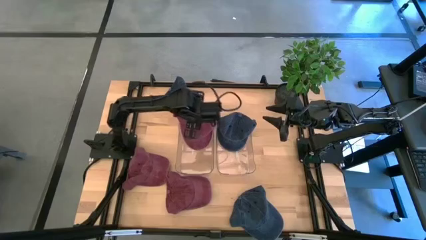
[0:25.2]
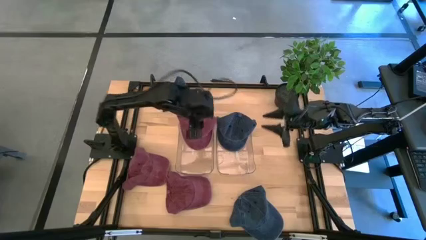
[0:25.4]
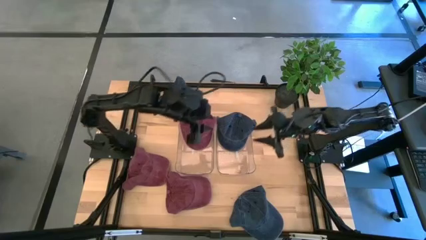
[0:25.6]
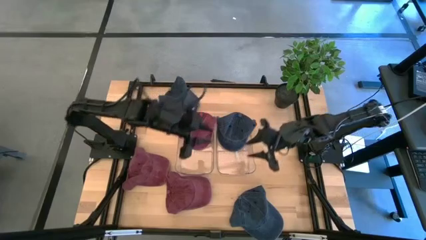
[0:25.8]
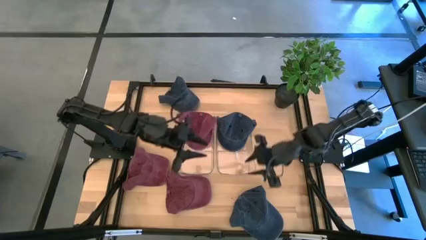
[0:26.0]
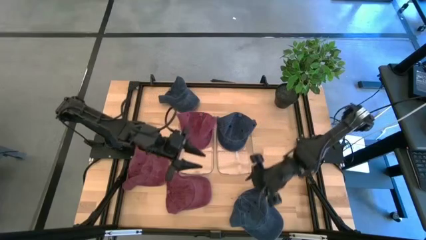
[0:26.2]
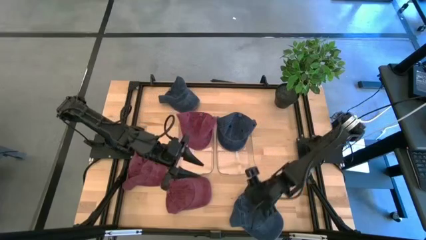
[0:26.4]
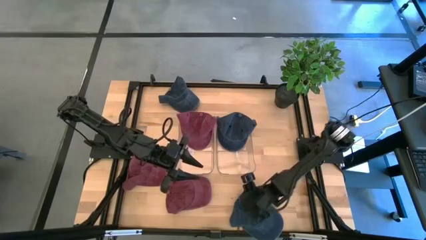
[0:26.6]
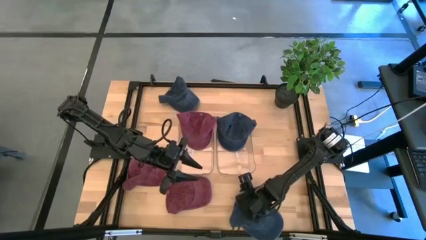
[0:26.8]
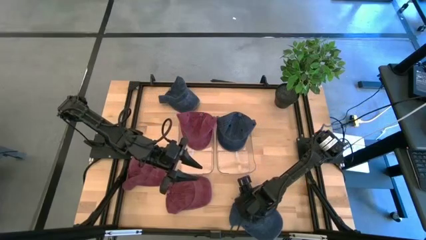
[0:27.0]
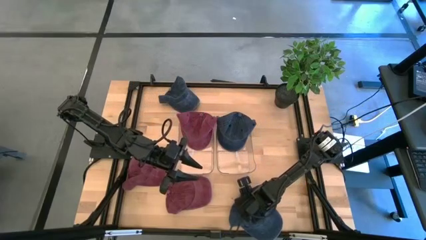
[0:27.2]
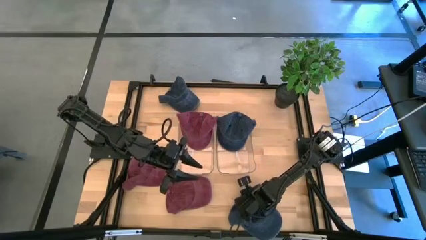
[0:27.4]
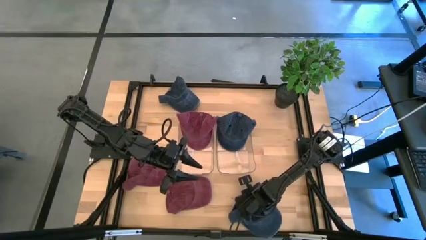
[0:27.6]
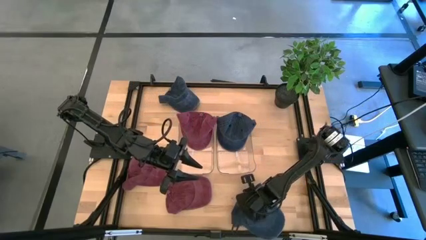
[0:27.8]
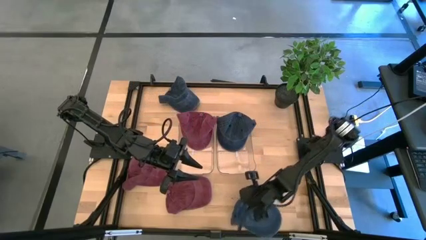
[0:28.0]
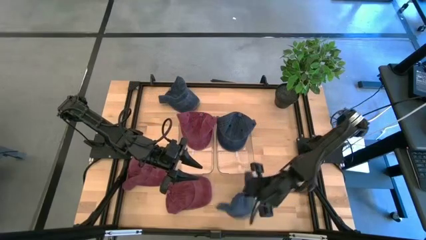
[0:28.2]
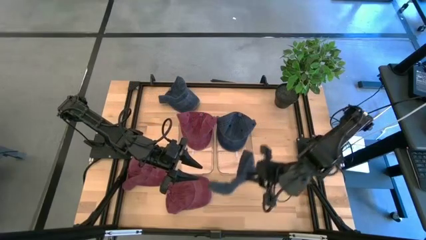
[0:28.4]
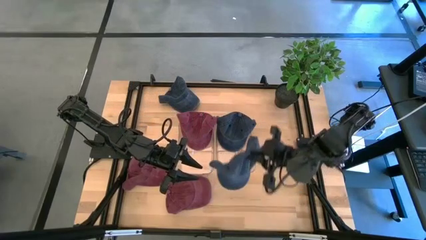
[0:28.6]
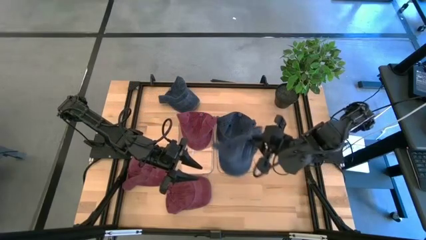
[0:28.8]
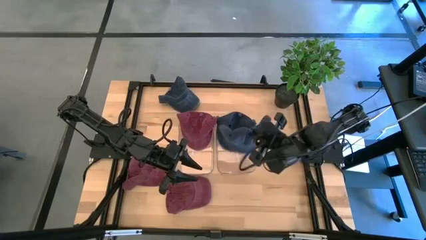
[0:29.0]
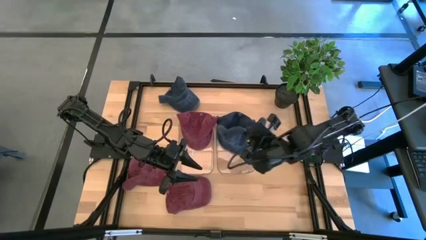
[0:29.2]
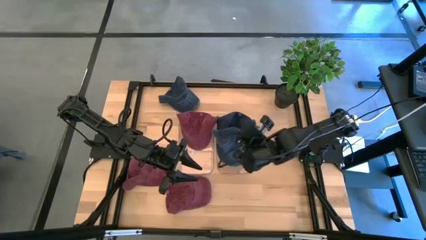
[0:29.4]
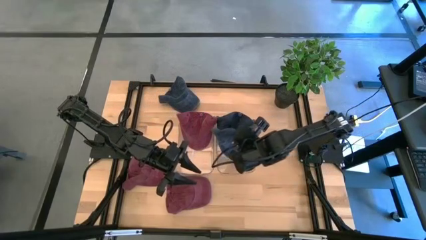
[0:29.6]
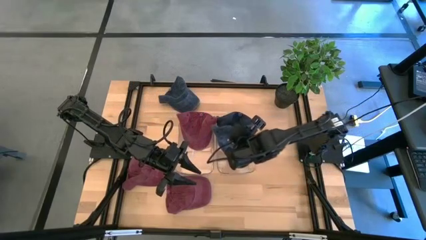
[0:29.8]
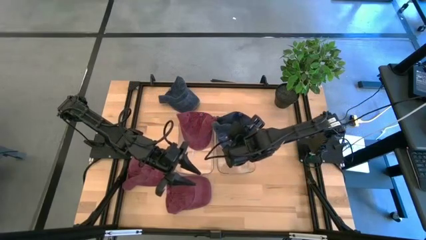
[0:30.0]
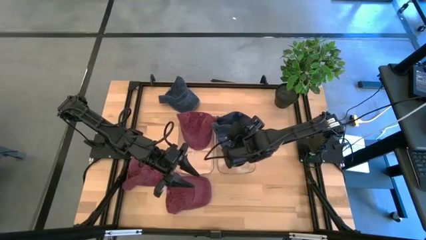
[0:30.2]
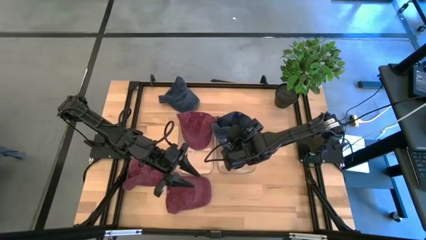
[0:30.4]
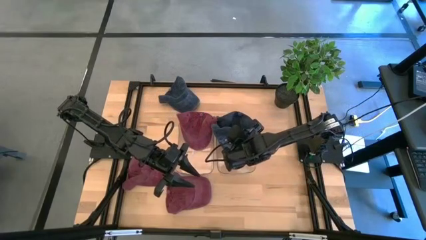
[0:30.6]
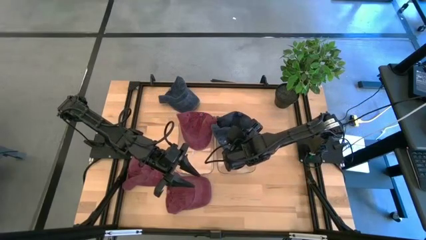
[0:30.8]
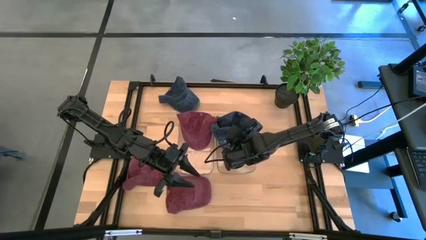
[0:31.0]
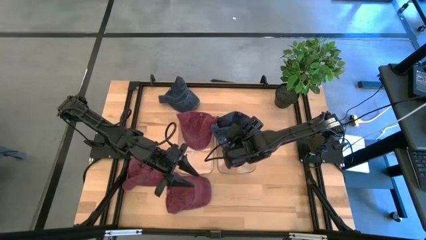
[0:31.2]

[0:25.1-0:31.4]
Task: Pick & Place hat
Put the bottom blue cap into the right transparent bin

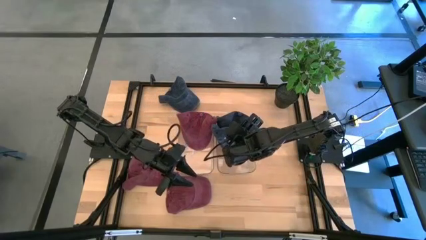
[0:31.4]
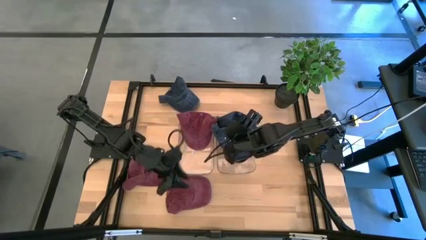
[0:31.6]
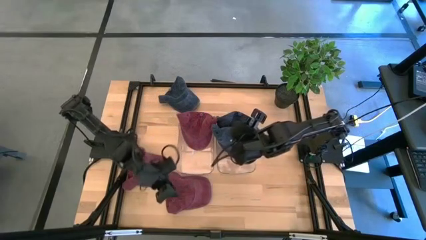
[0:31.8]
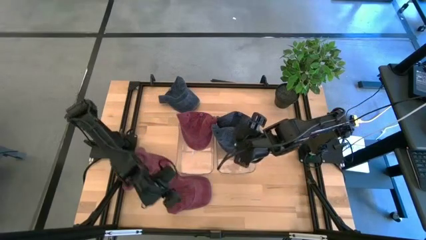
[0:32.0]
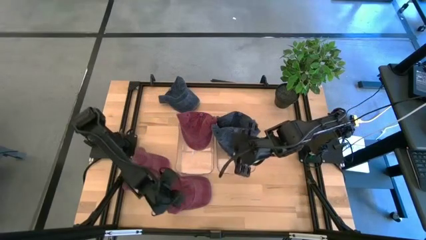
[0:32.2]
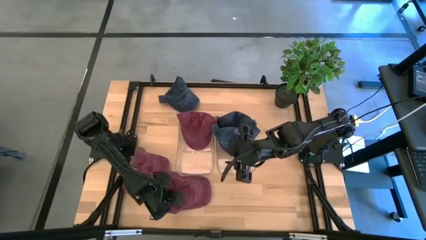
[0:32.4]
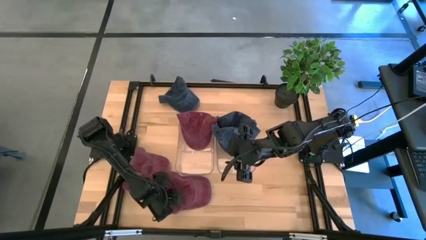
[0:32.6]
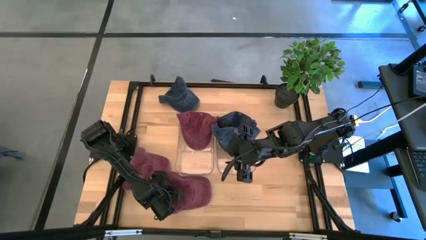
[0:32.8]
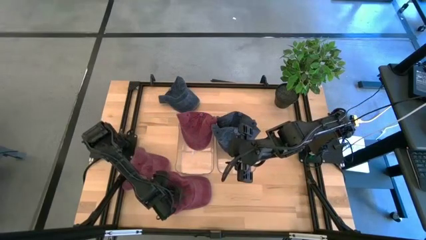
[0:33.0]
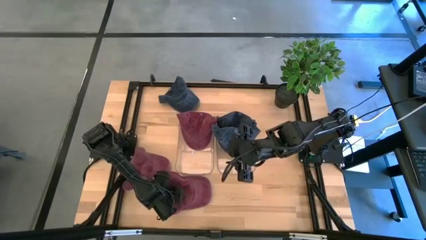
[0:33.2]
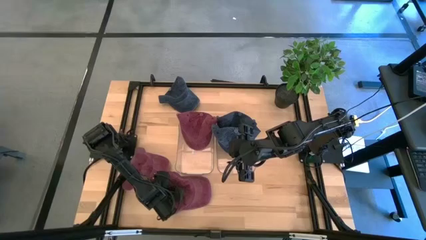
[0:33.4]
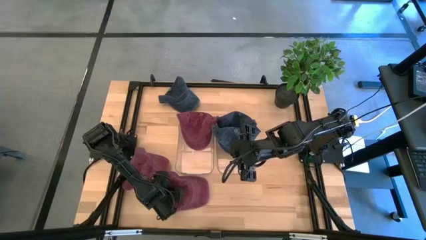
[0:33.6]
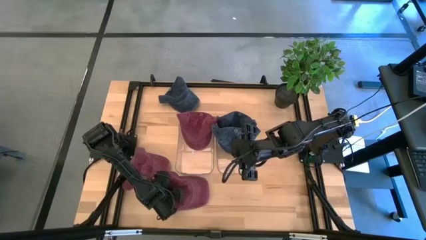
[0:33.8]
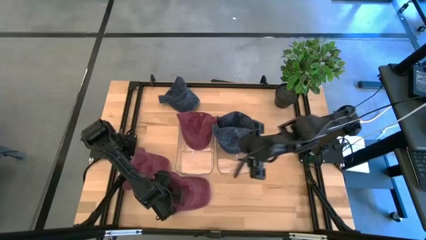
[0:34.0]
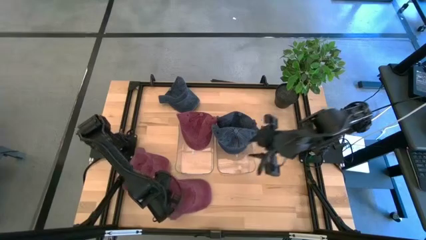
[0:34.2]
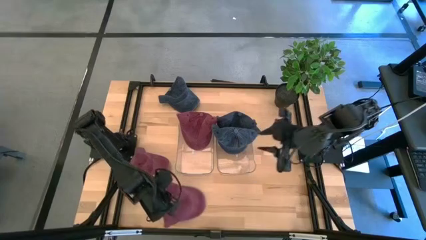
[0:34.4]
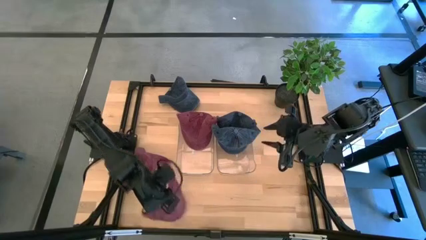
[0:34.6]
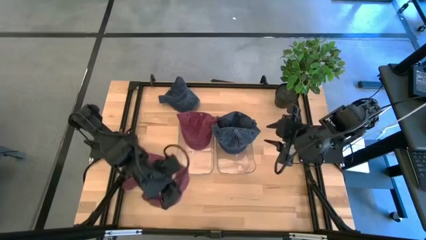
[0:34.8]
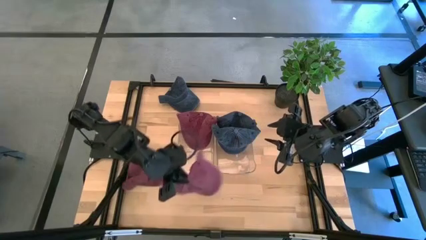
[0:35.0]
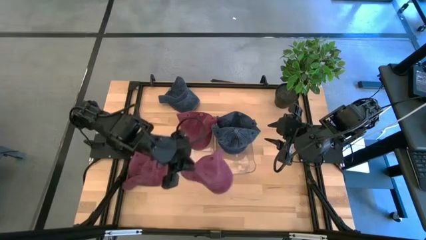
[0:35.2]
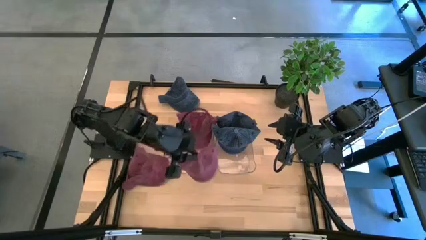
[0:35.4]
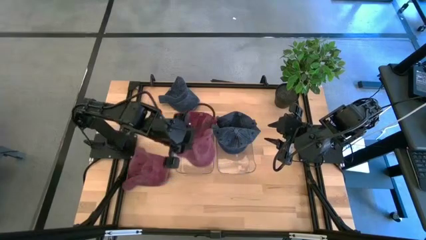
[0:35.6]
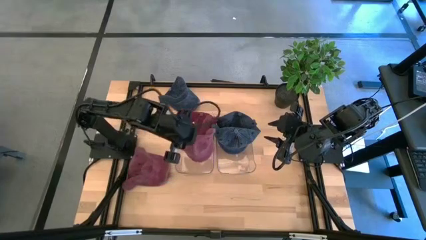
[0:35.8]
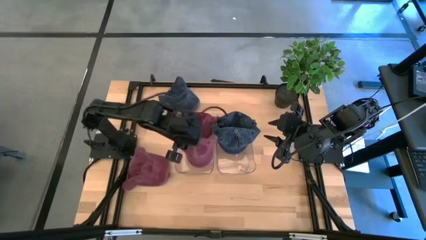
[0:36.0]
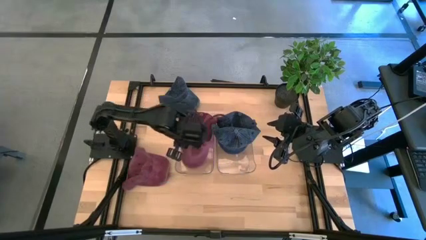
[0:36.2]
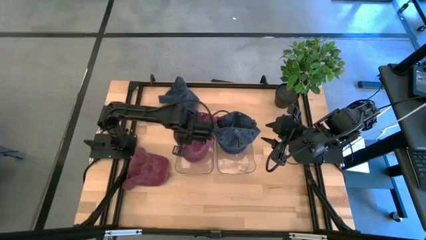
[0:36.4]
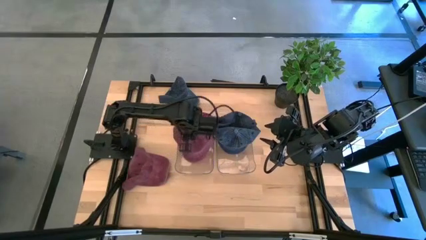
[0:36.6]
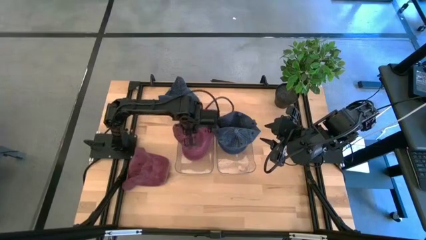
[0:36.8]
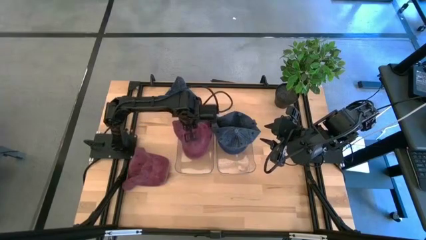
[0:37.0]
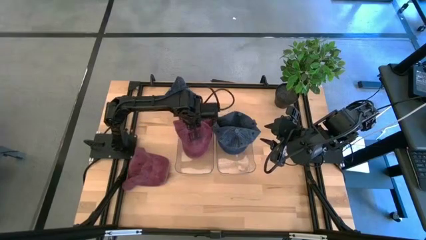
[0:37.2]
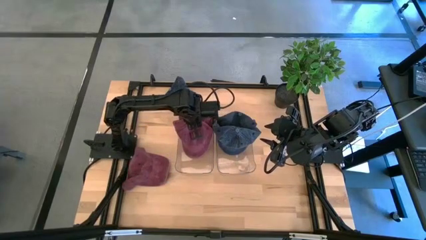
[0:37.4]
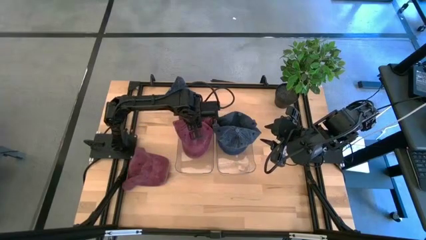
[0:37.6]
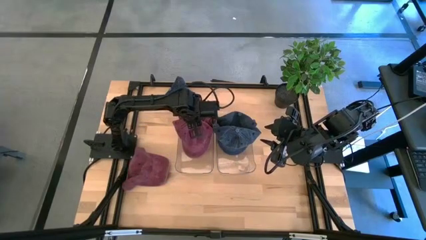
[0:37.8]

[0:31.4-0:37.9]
Put the bottom red cap into the left transparent bin

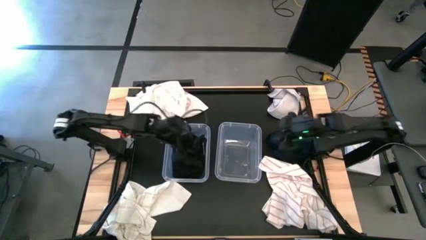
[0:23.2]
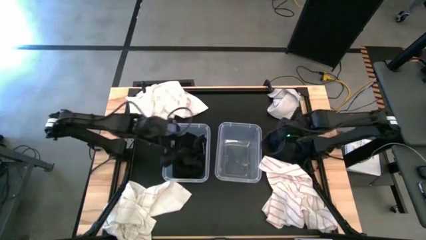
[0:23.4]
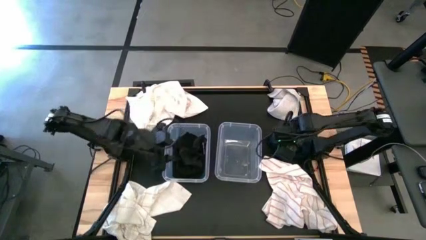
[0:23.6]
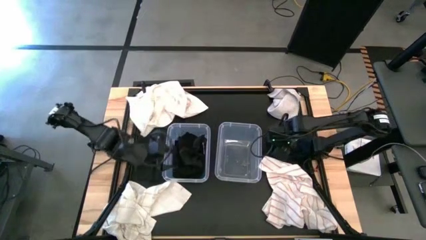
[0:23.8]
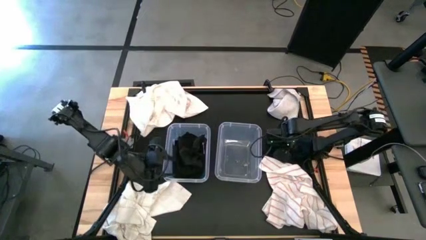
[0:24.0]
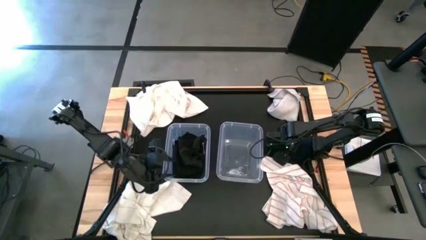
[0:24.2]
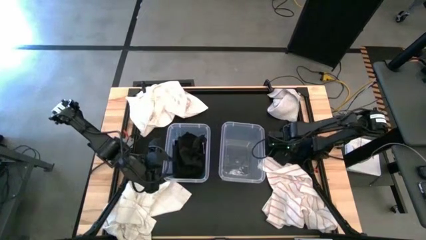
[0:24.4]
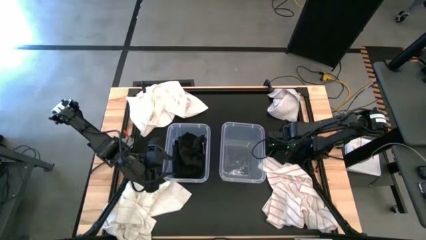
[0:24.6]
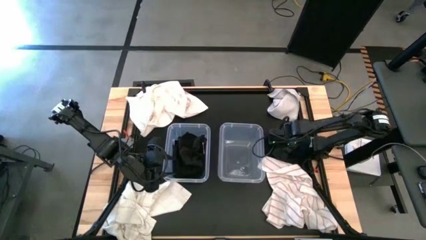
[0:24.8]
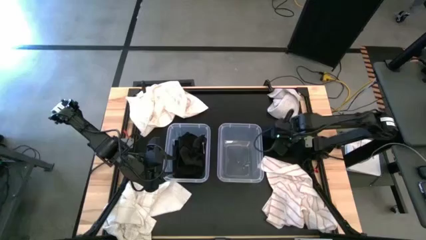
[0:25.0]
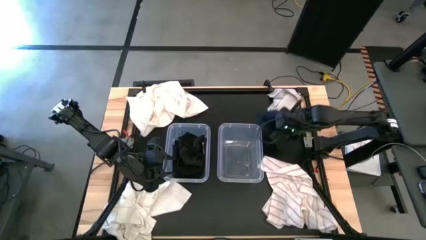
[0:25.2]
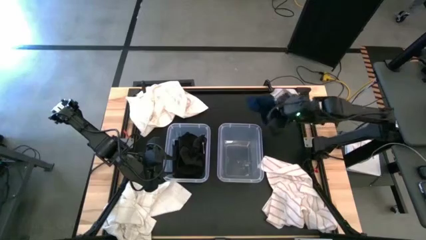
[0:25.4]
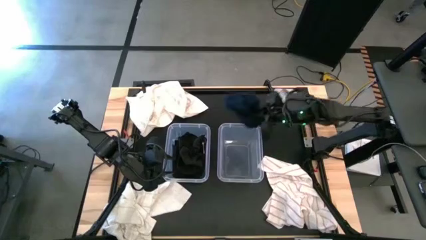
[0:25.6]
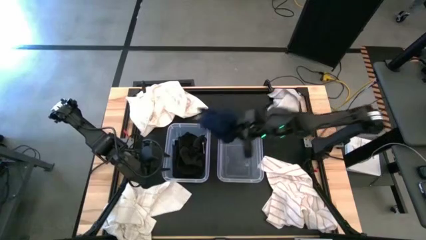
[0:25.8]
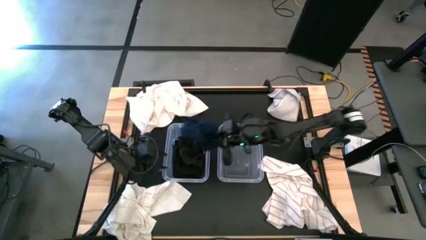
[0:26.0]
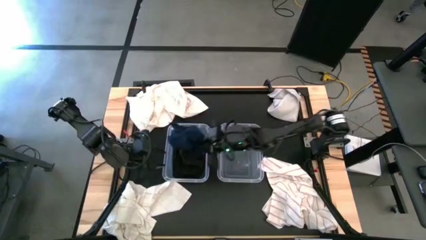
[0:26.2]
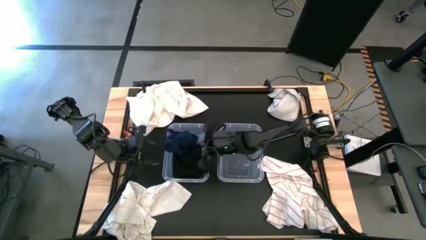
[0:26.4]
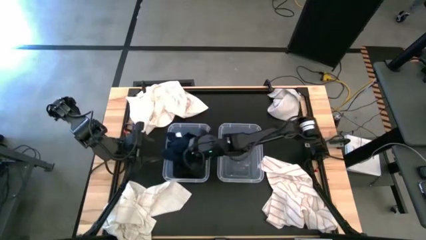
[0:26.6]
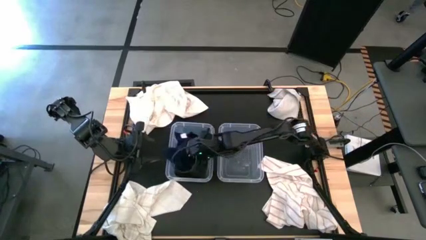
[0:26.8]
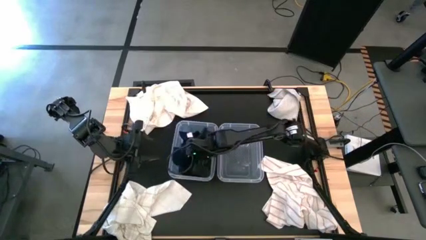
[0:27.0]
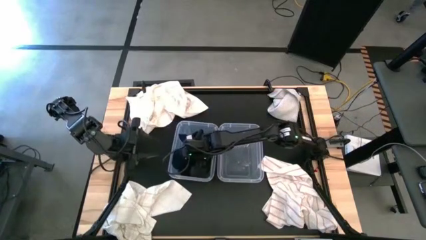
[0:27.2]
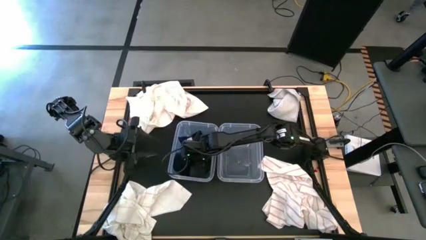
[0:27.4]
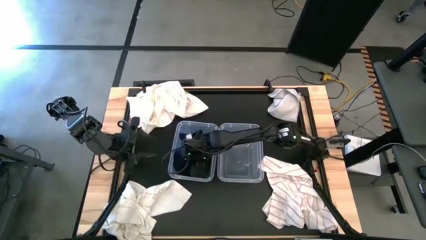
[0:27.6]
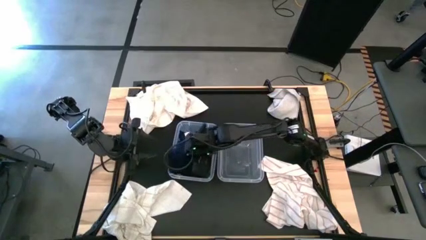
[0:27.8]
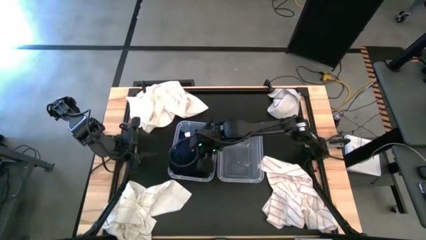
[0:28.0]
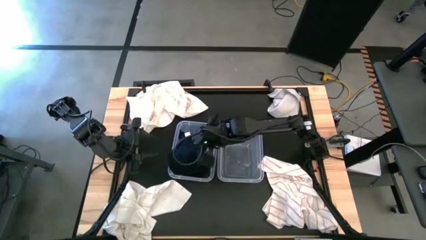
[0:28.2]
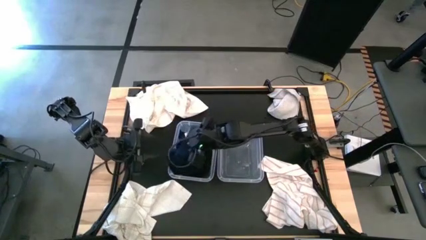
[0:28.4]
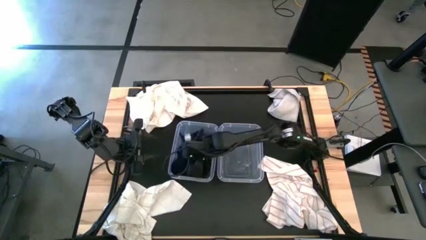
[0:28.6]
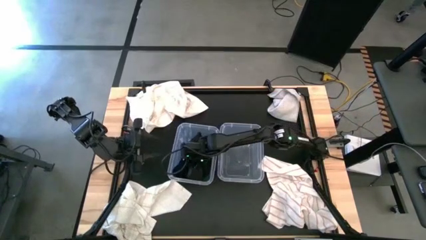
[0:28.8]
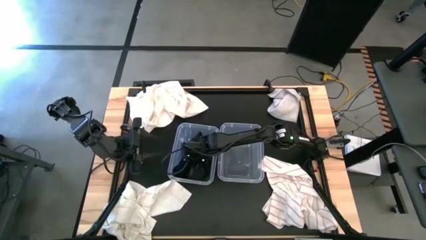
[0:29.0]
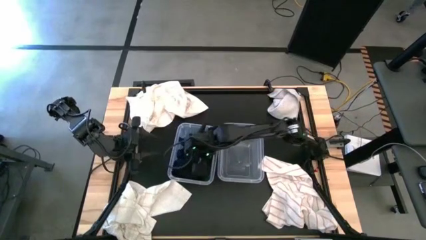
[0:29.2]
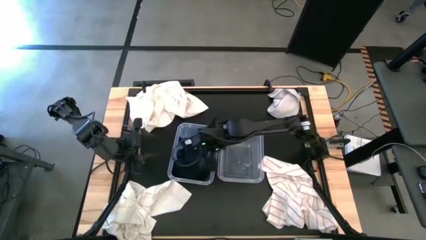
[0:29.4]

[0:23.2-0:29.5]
Task: Sort towels by color in basket
Put the dark blue towel into the left transparent bin
